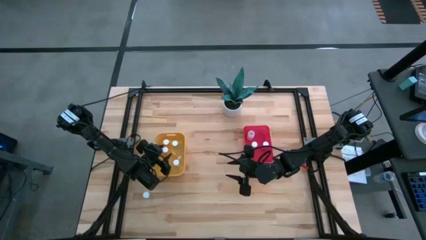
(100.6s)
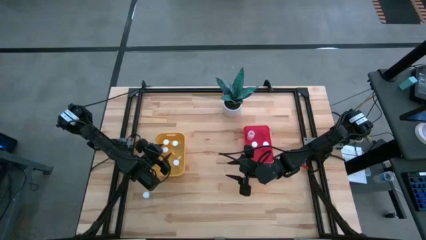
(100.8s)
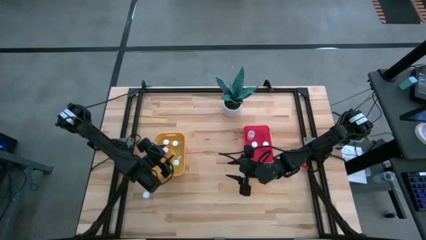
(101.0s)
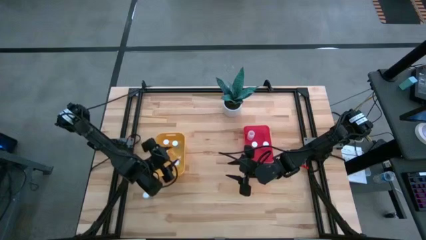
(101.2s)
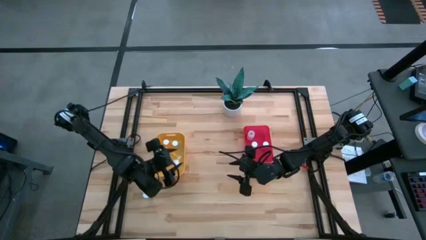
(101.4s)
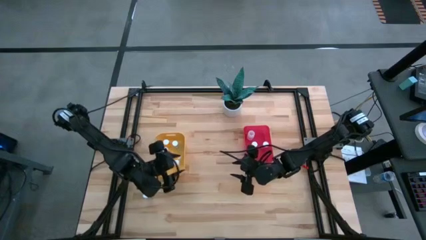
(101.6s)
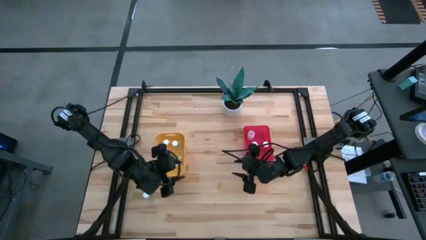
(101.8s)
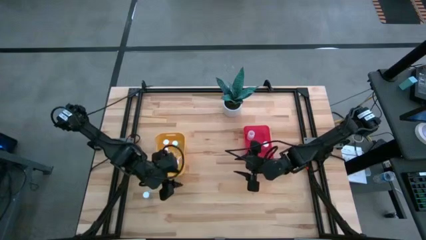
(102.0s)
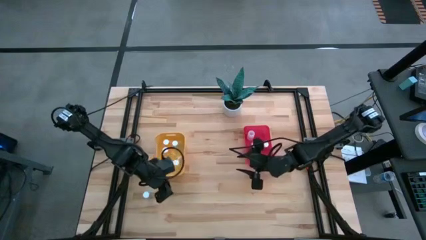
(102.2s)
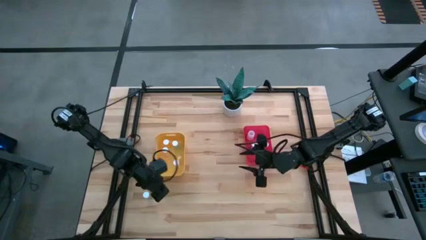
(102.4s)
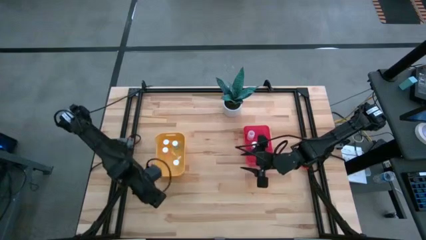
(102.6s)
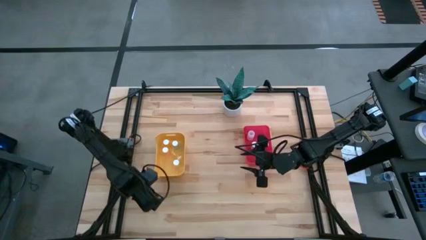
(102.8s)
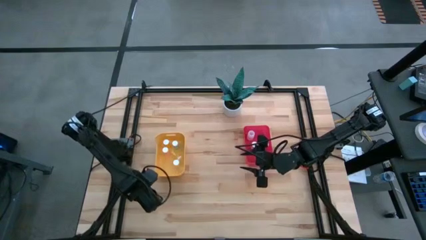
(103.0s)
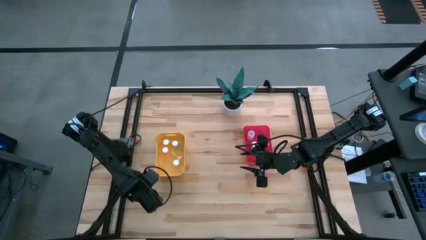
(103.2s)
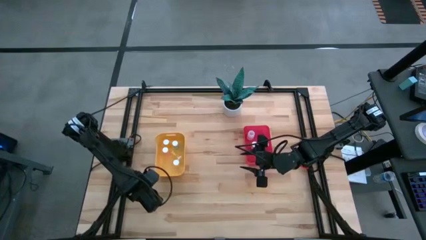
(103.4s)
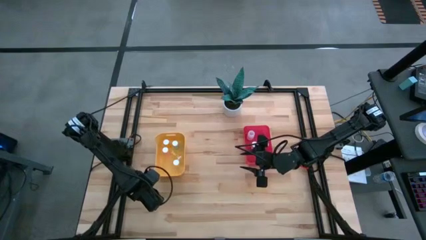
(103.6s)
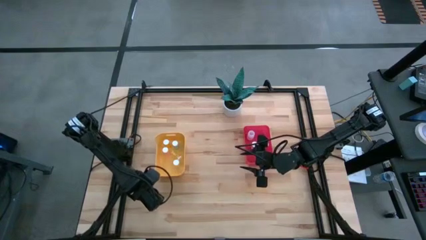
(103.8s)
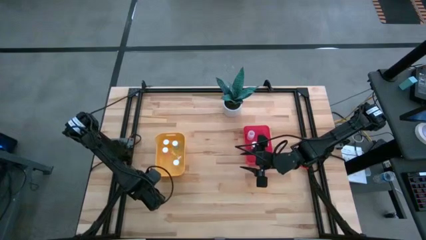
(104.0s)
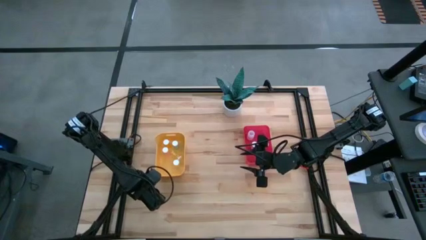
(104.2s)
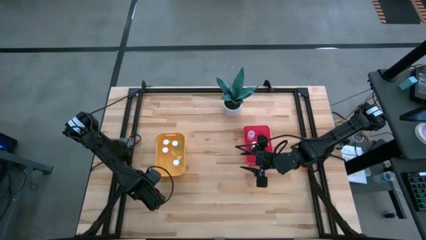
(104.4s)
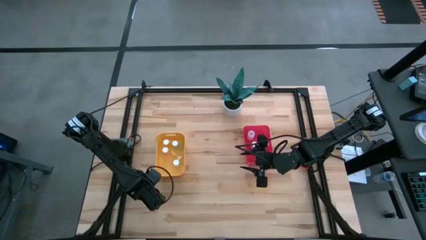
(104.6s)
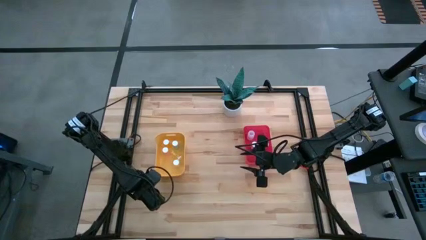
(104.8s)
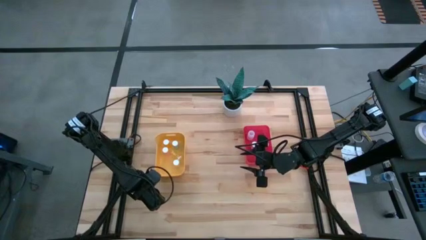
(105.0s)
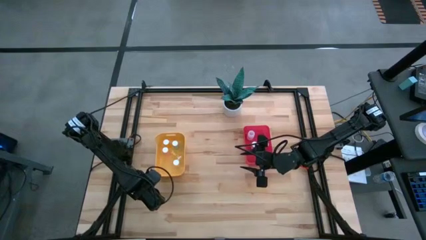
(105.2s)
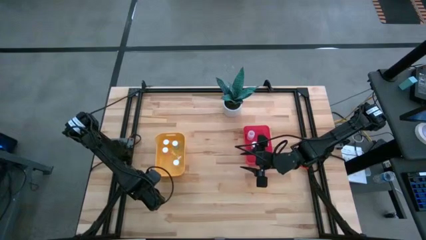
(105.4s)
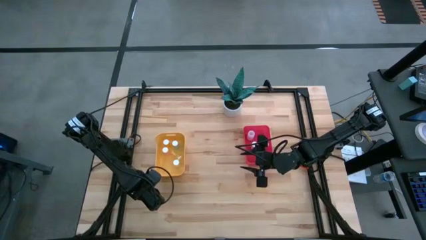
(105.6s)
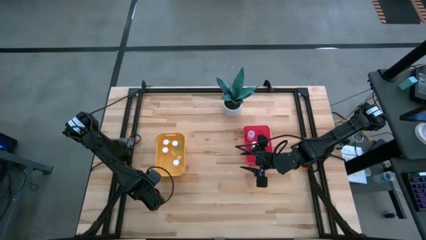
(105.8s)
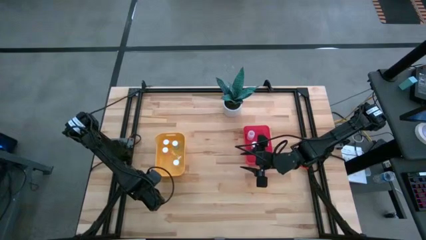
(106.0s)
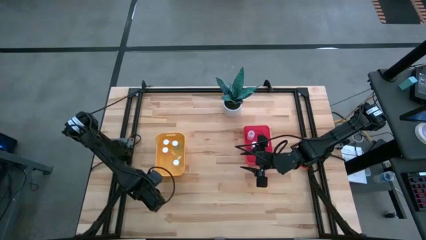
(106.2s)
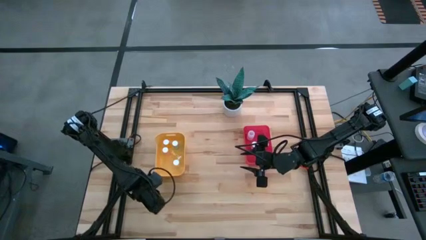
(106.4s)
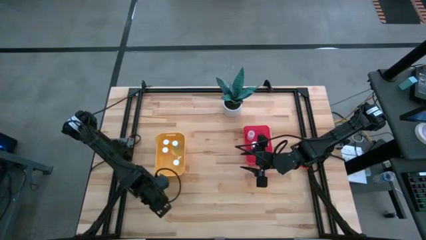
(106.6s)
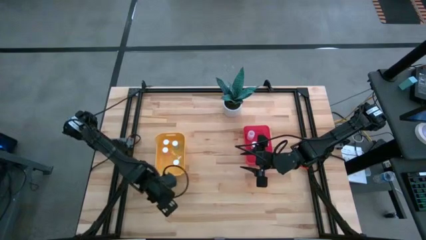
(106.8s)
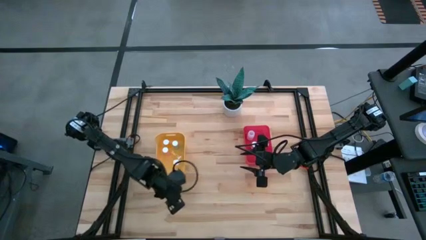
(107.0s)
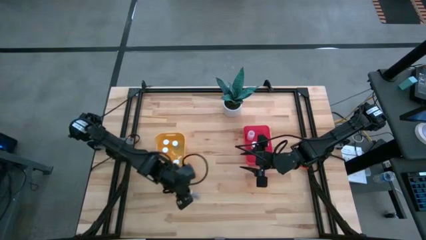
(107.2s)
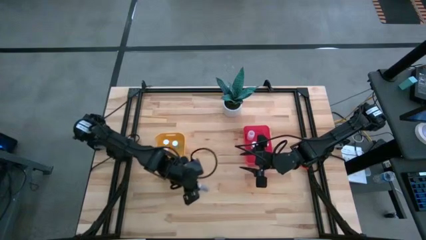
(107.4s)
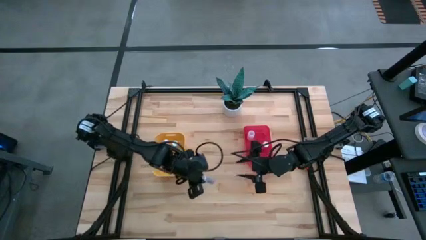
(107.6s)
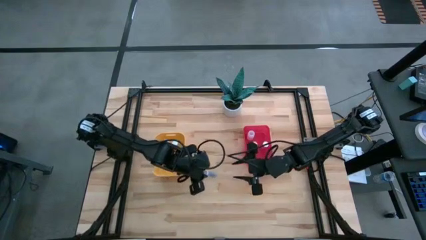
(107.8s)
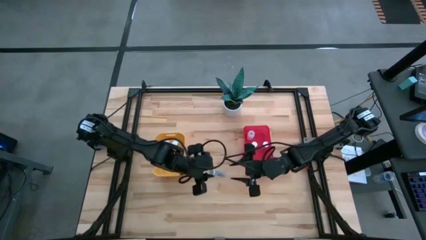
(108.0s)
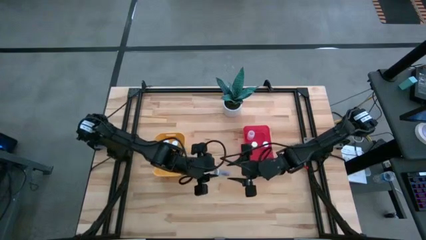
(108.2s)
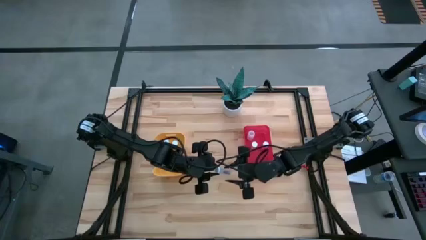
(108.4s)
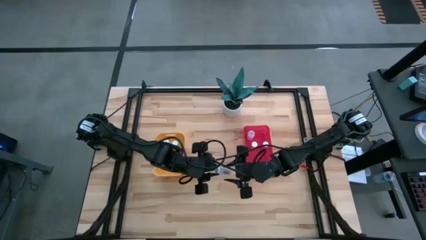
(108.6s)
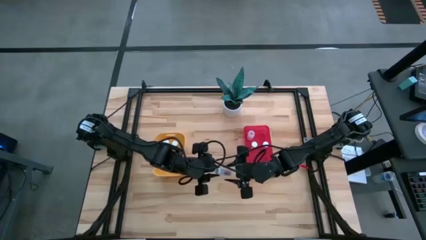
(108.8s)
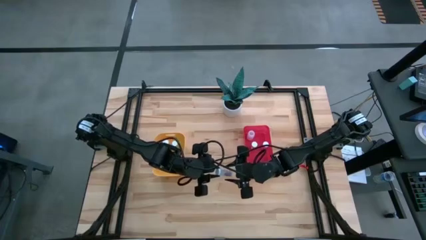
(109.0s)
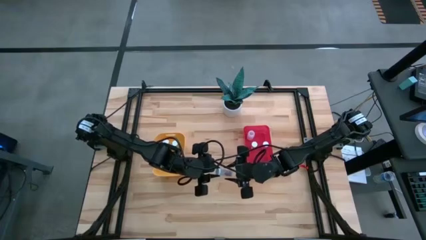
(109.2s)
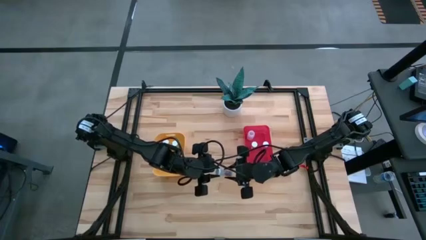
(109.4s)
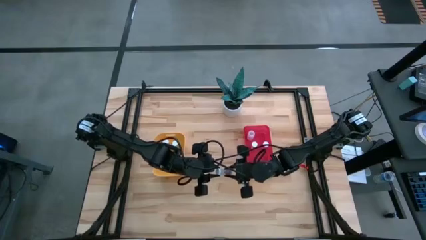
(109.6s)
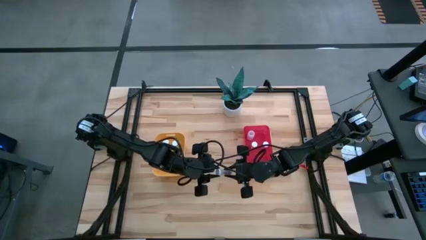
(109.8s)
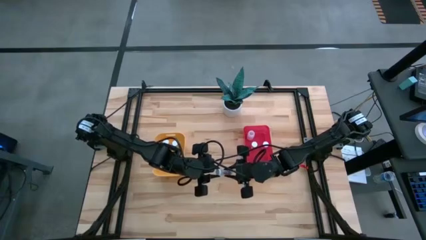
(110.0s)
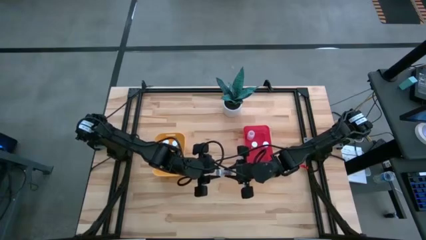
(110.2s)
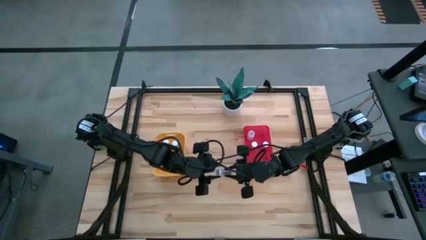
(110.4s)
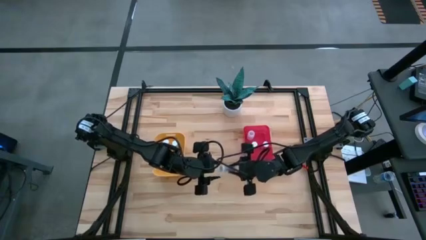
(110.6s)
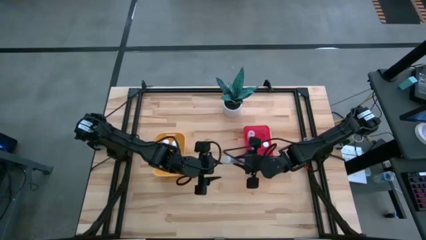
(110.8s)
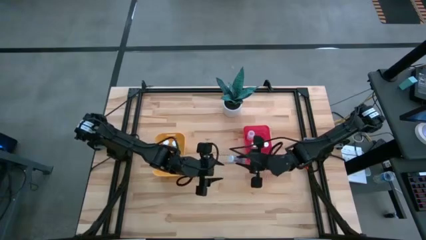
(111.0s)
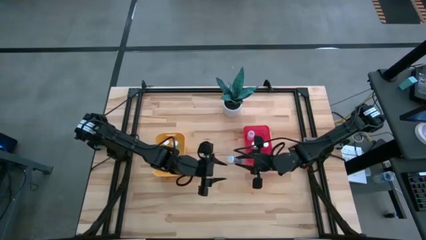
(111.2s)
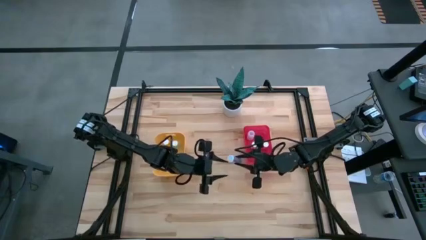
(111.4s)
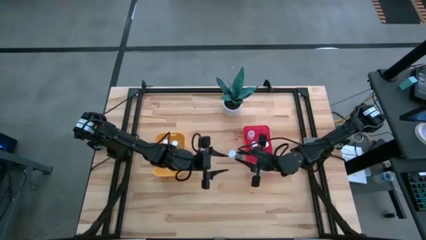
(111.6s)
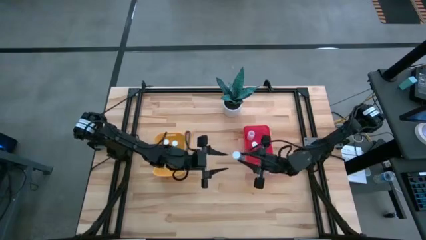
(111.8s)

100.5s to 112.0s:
Task: Pick and place medicine bottles into bin by pill shape (circle, oval)
Put the blue capsule bottle into the red bin
